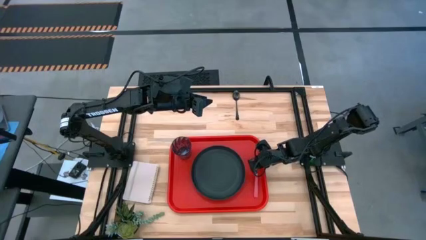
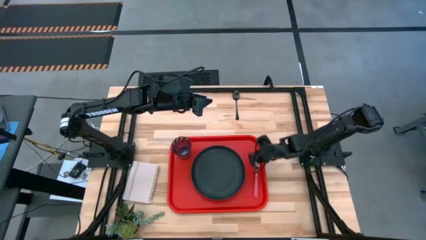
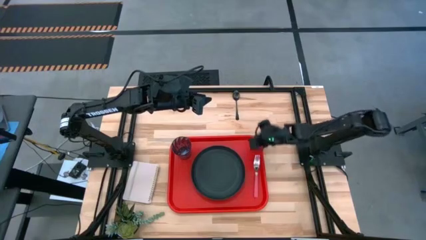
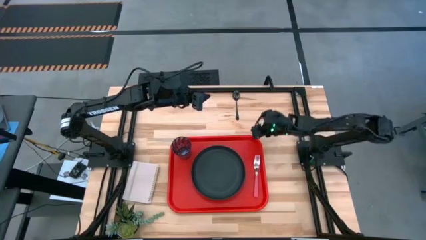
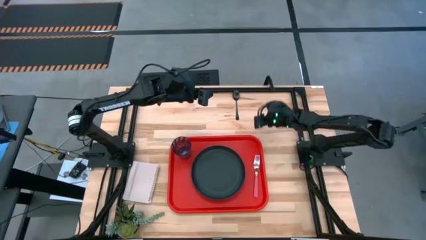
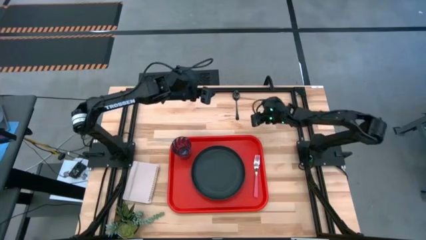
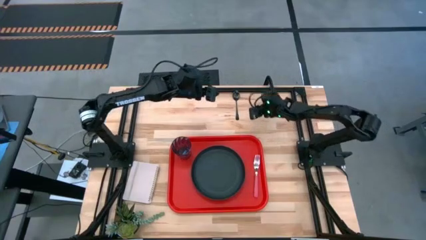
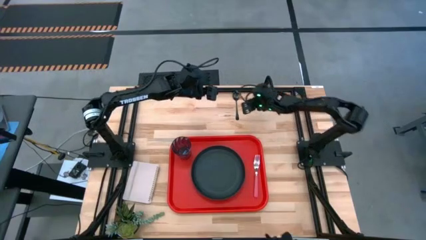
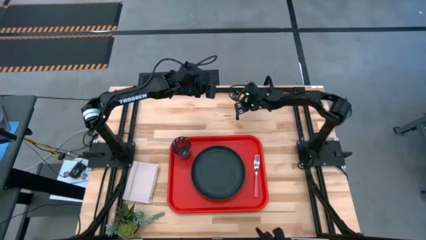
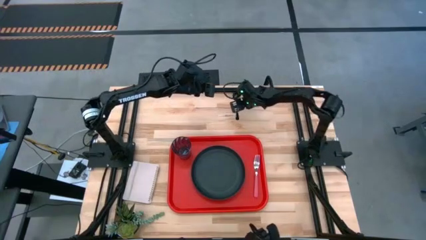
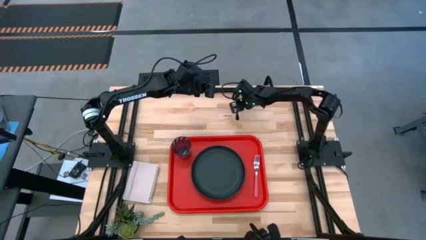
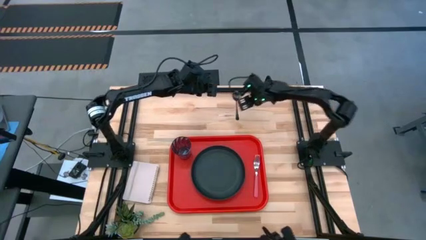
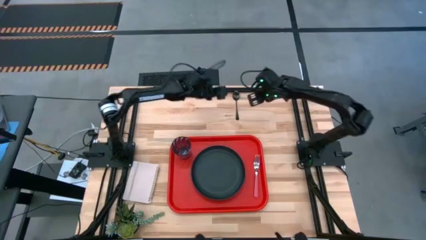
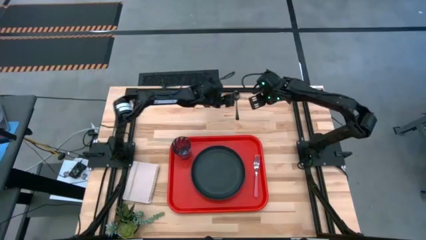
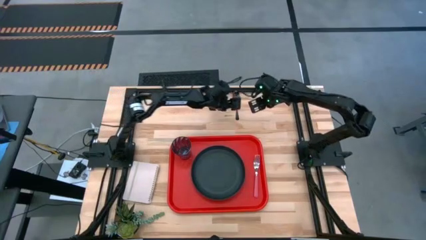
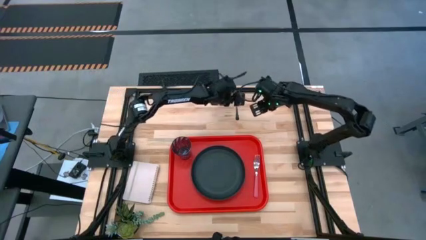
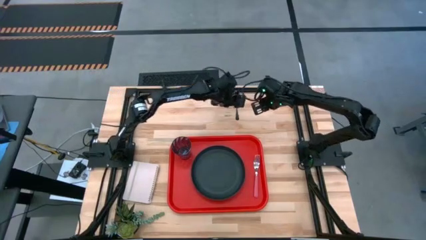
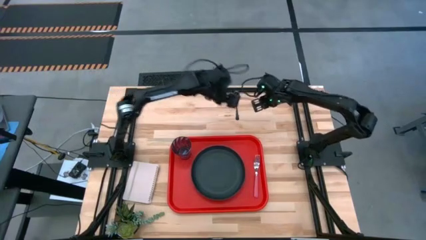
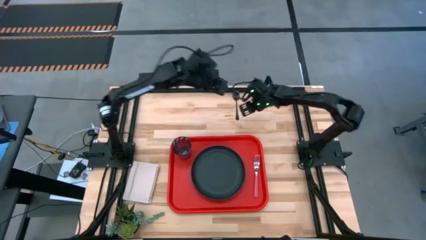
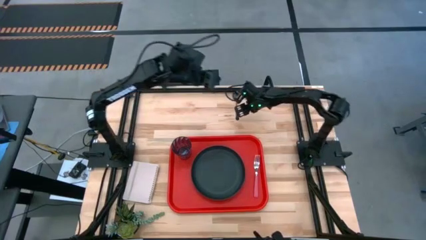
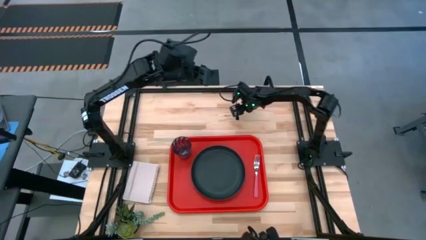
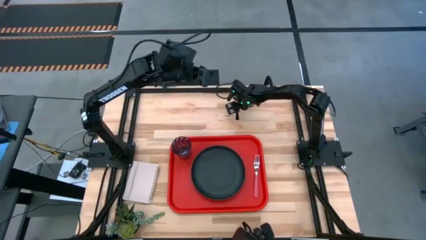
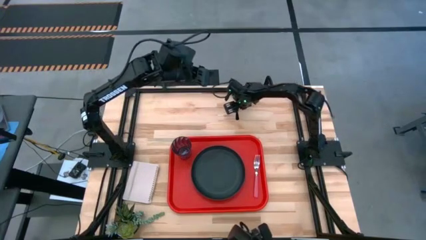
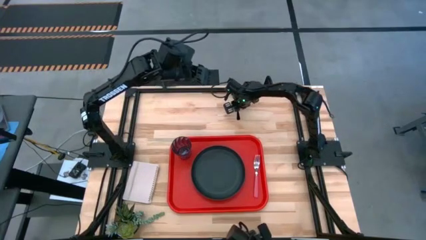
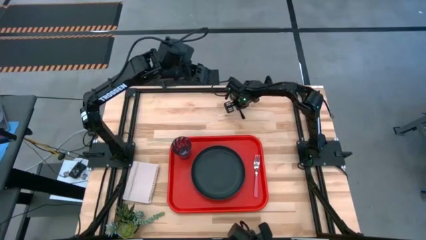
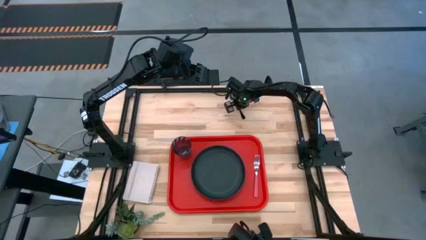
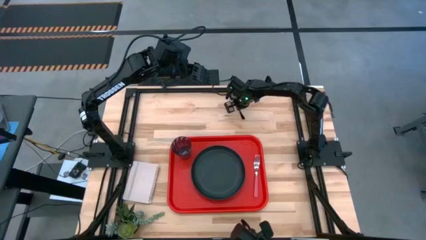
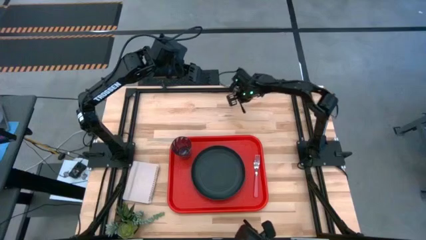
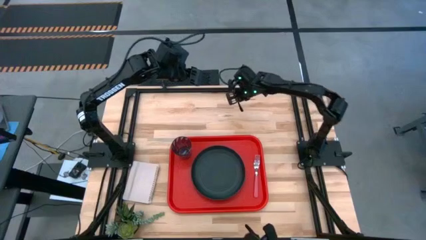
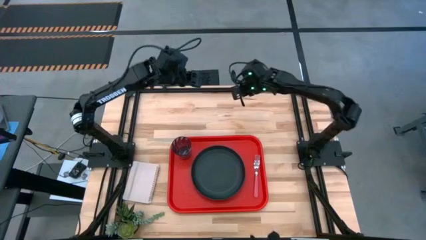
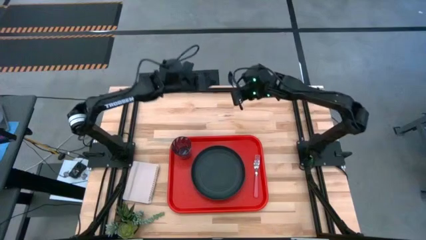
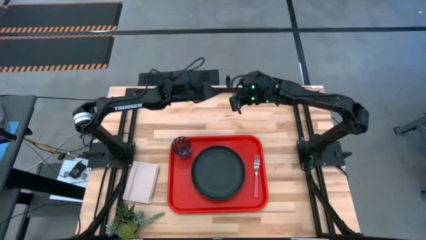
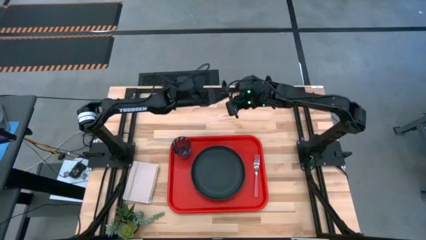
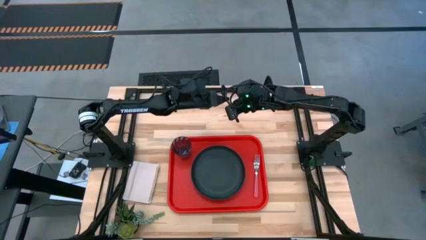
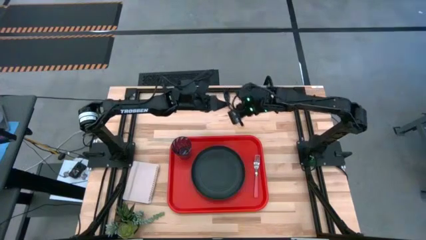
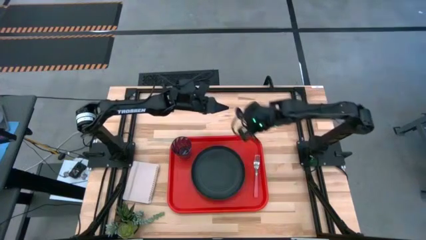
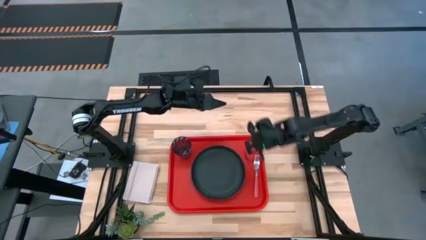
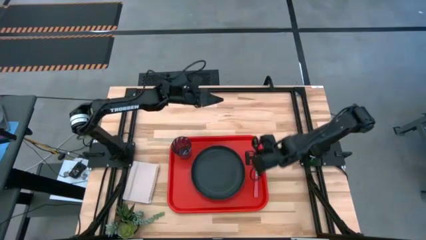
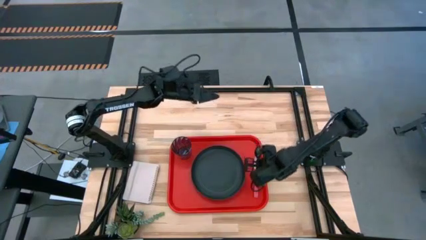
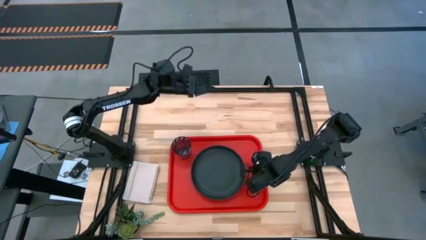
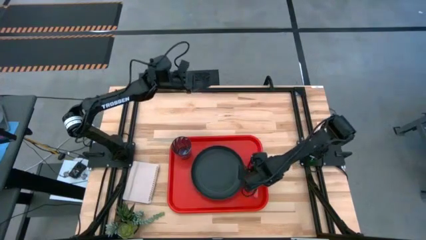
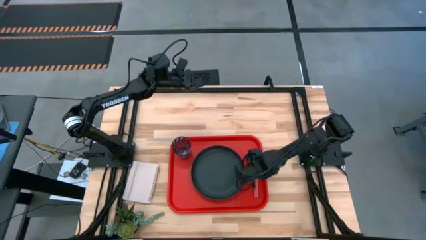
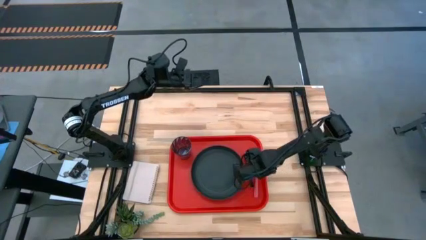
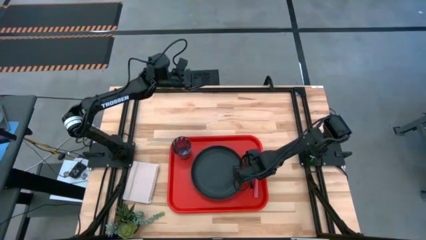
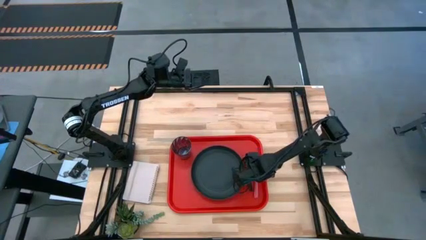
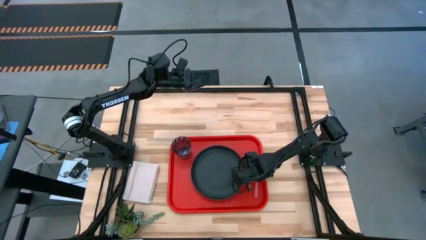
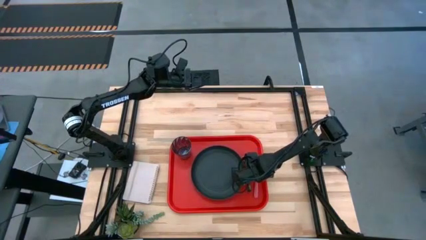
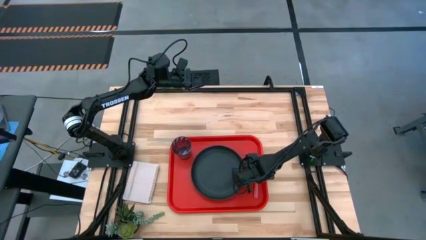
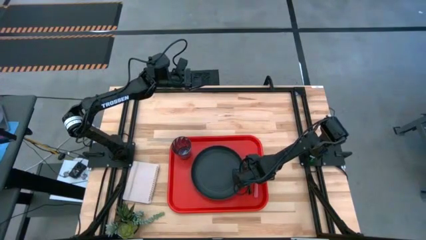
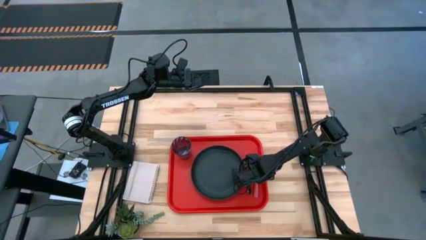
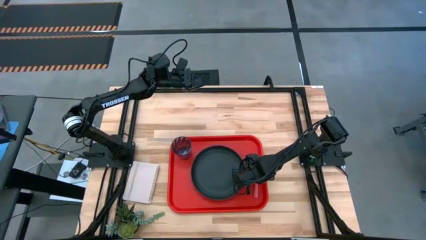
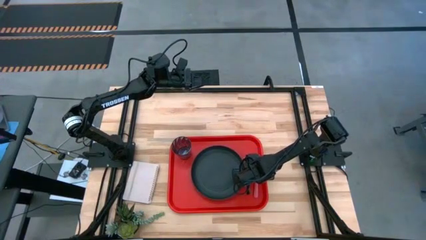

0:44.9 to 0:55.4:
Task: Pick and place plate/cup/fork/spoon on tray
Put the black spoon on the orange serving tray between the pink fork and black plate

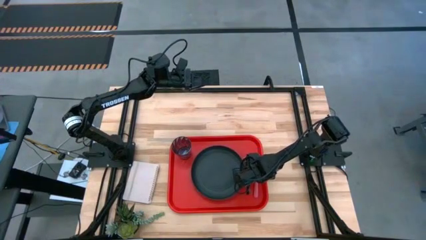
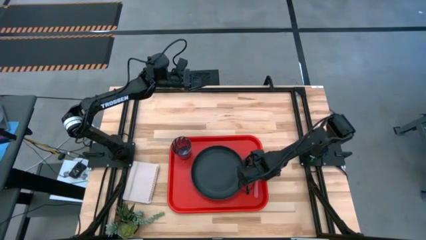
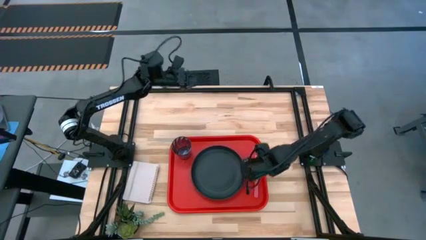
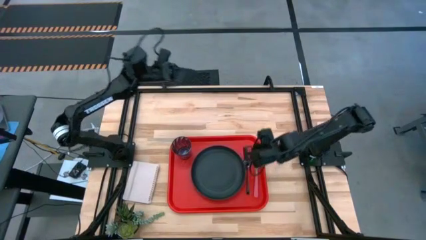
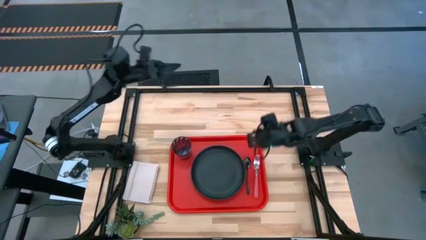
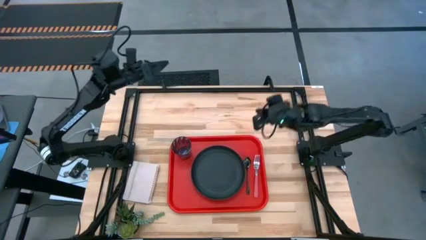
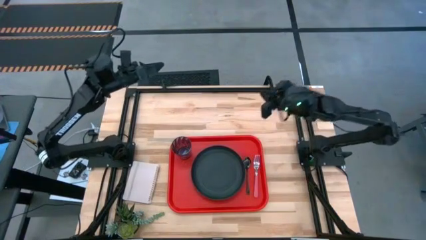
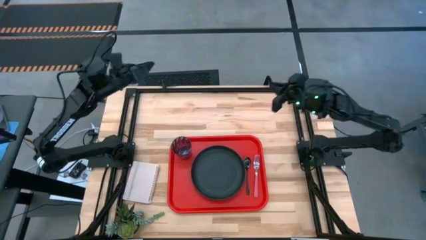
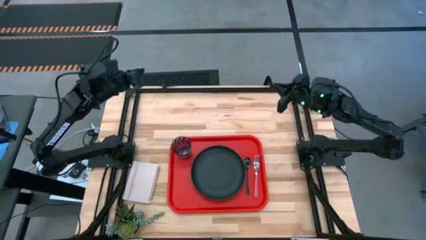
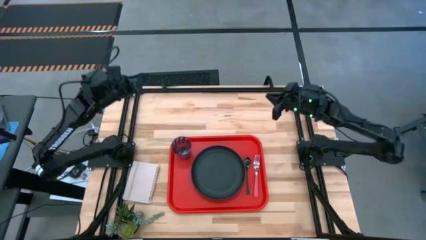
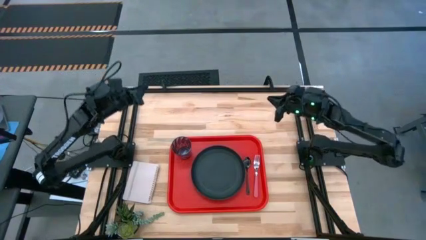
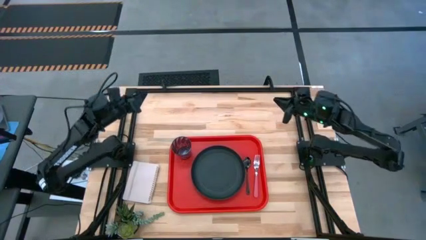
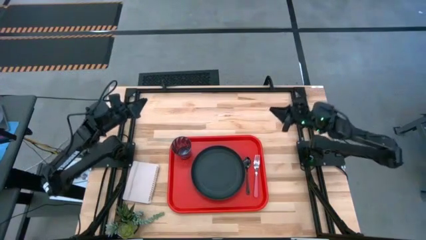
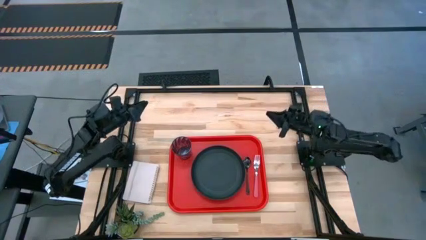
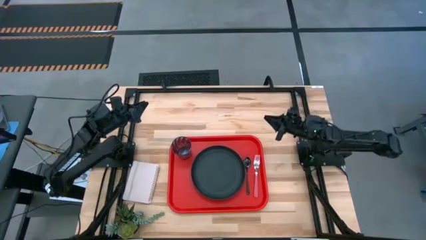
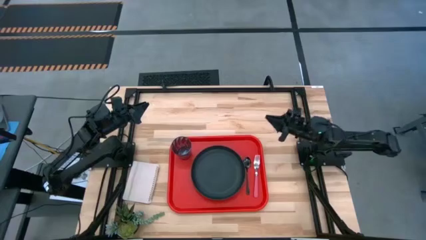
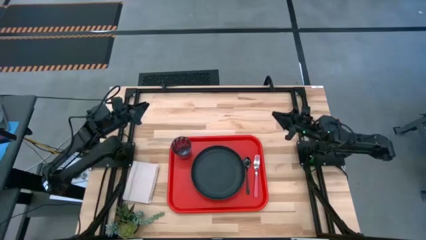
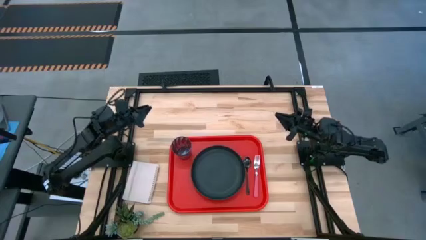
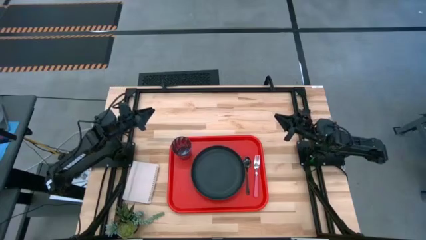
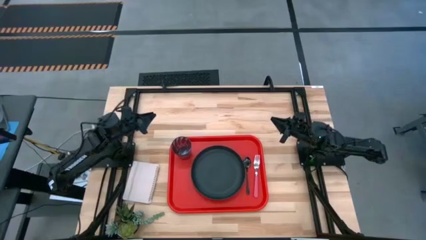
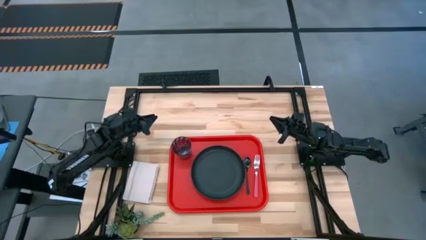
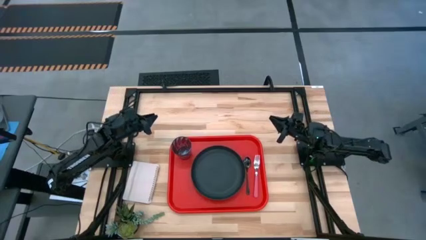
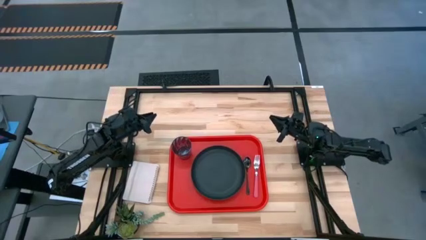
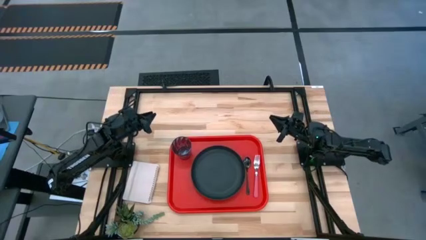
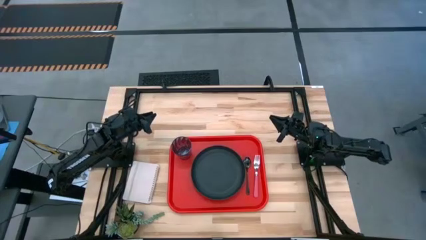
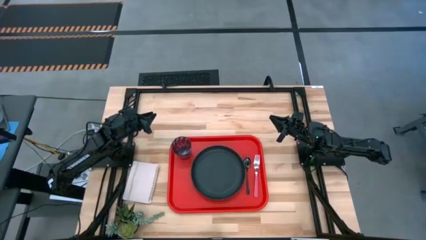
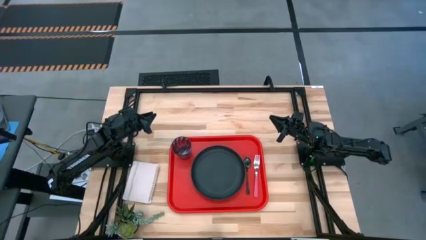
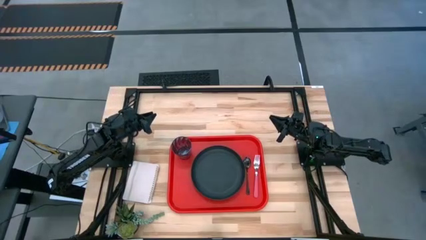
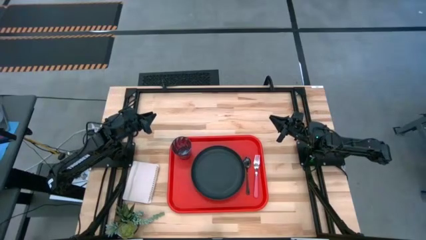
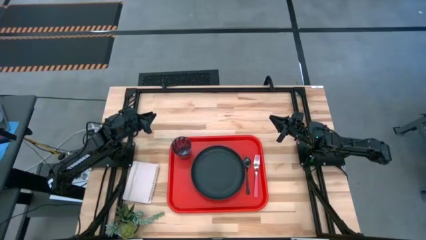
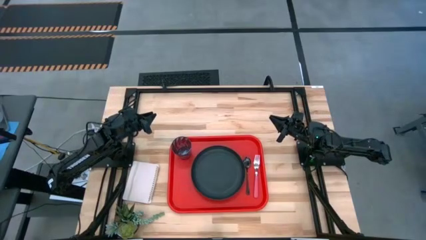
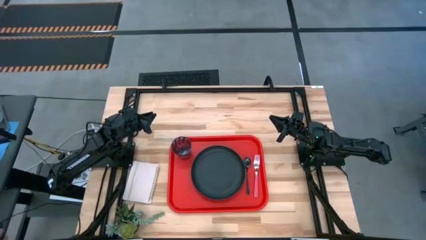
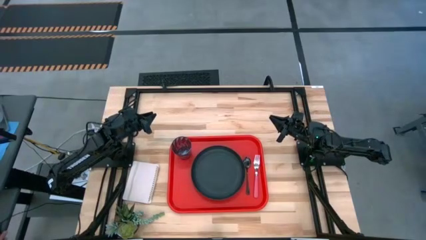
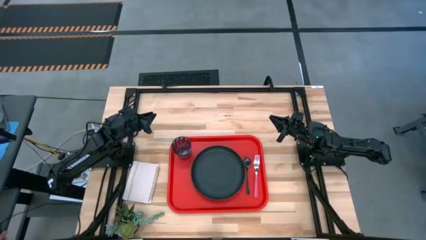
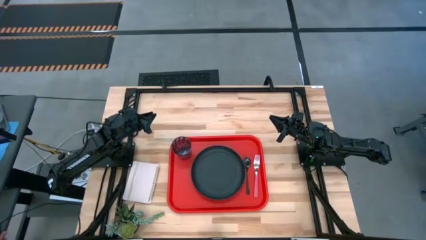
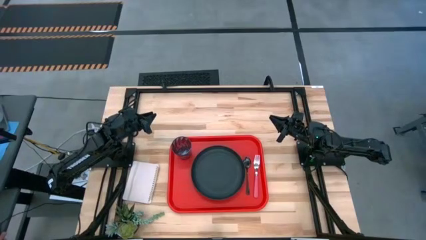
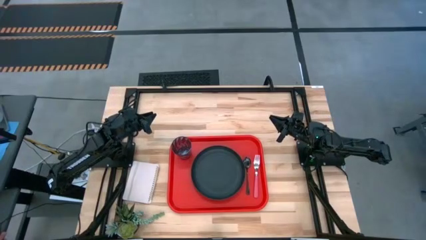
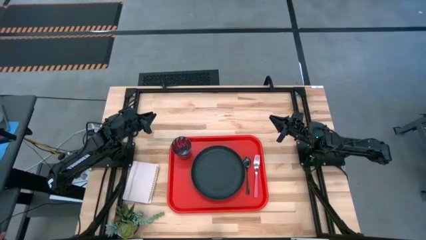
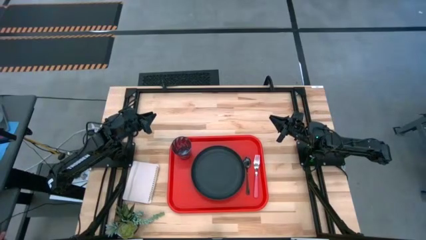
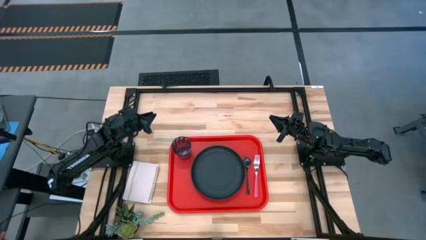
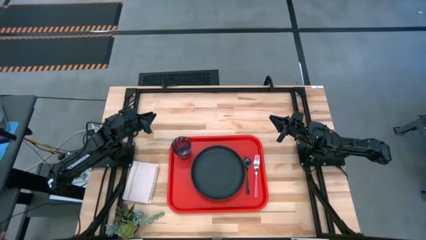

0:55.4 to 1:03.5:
Return to Home Position
